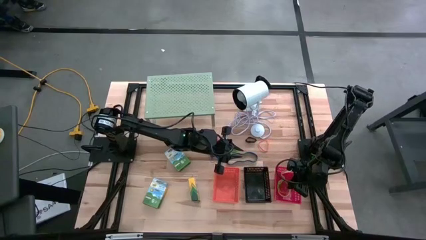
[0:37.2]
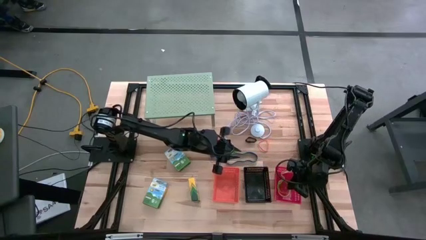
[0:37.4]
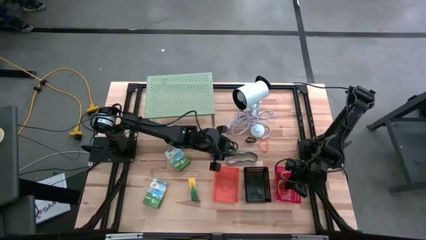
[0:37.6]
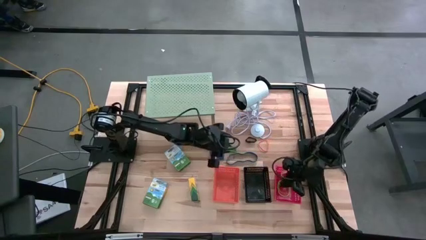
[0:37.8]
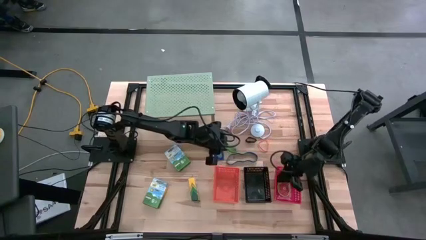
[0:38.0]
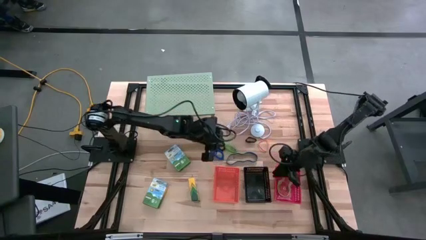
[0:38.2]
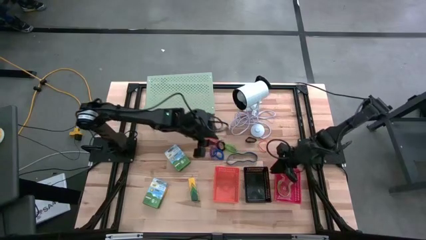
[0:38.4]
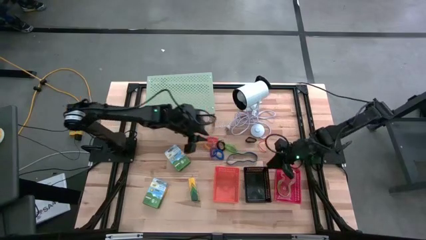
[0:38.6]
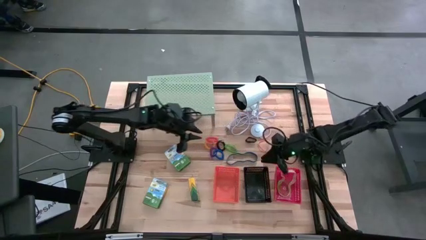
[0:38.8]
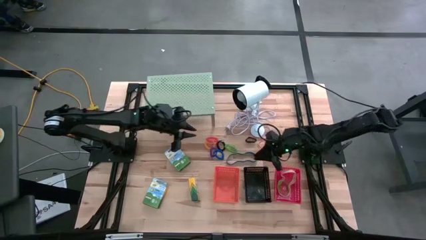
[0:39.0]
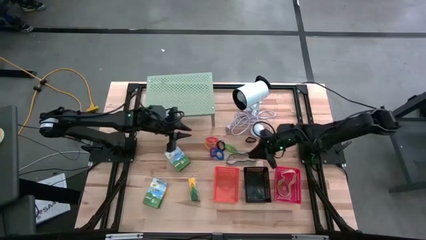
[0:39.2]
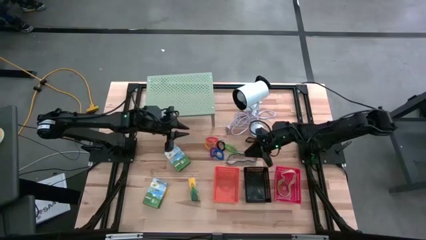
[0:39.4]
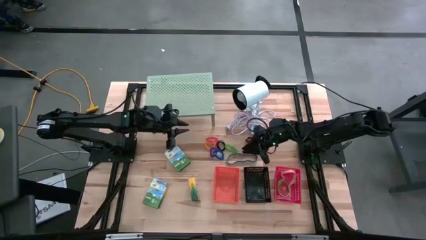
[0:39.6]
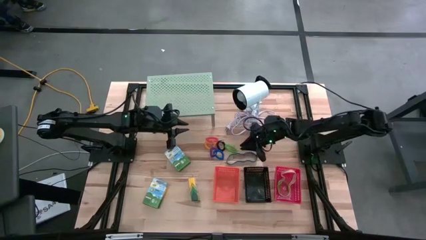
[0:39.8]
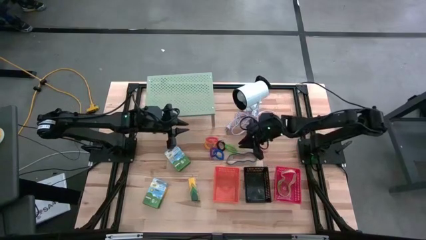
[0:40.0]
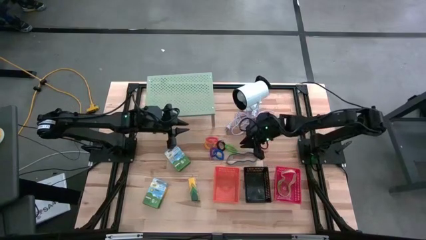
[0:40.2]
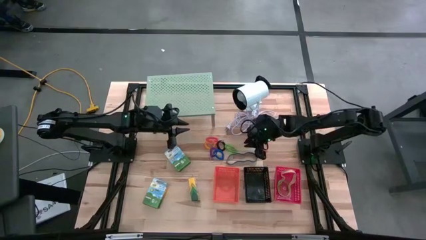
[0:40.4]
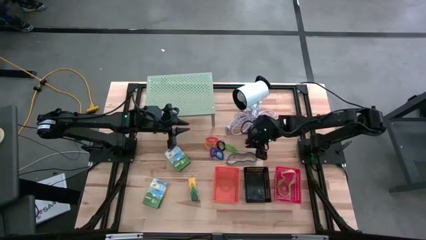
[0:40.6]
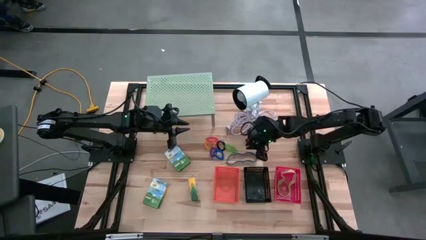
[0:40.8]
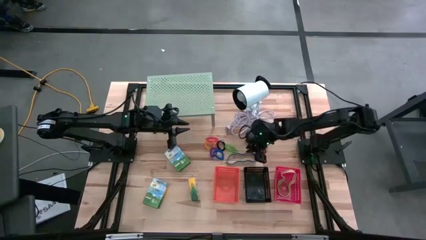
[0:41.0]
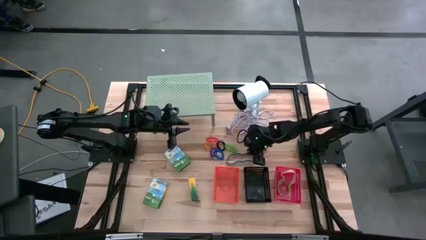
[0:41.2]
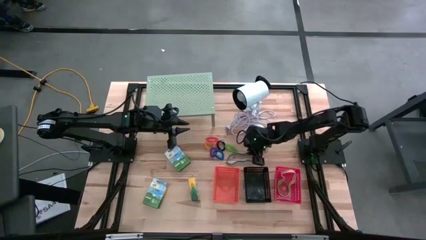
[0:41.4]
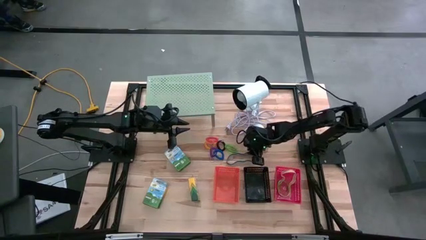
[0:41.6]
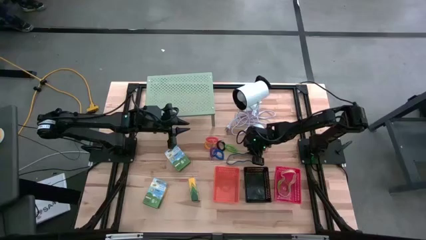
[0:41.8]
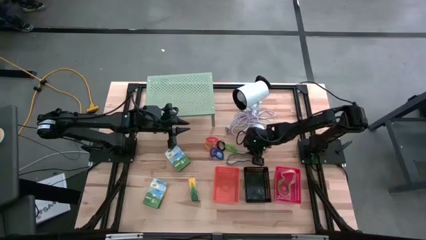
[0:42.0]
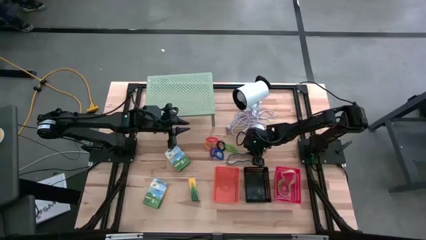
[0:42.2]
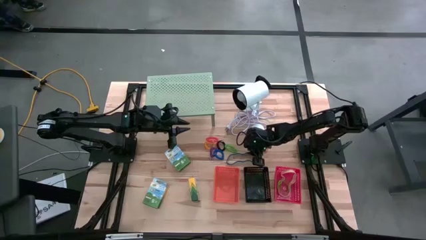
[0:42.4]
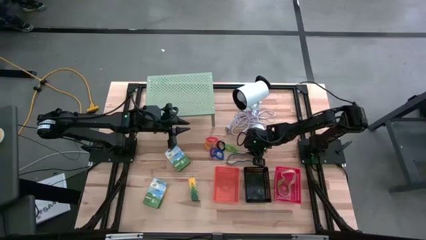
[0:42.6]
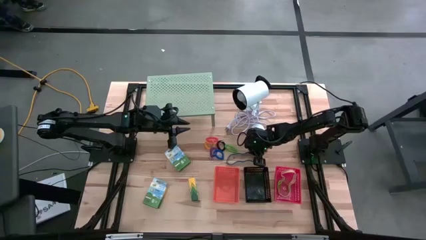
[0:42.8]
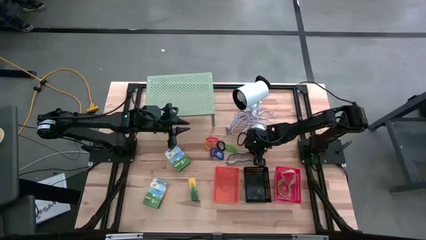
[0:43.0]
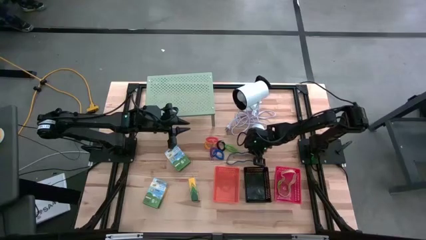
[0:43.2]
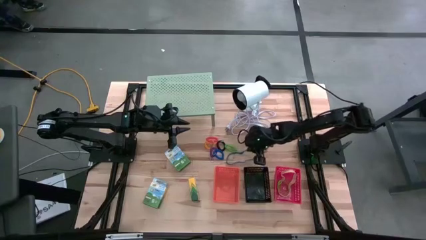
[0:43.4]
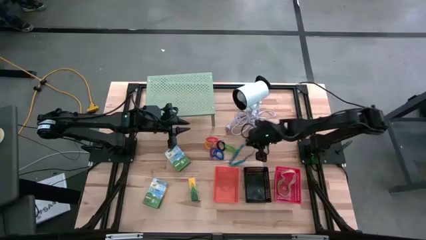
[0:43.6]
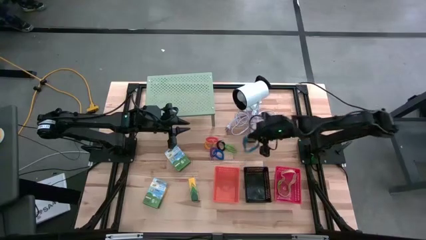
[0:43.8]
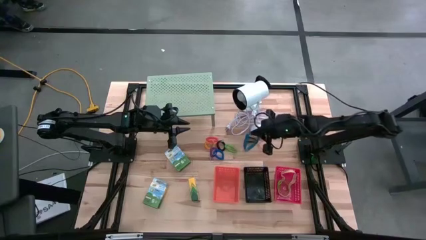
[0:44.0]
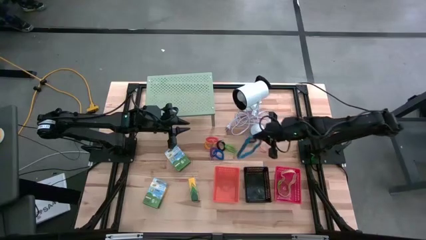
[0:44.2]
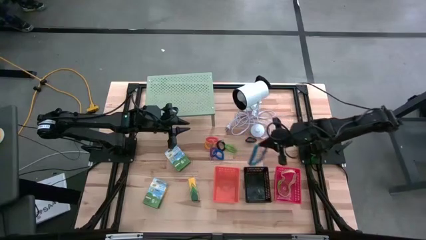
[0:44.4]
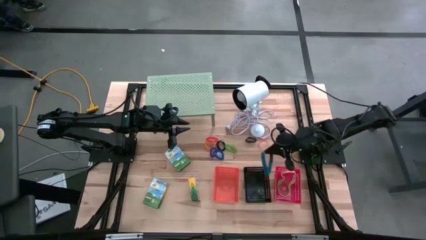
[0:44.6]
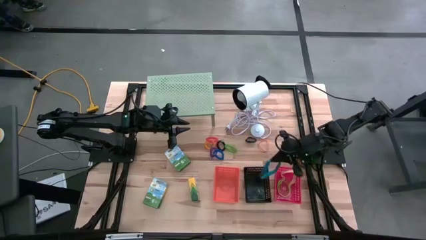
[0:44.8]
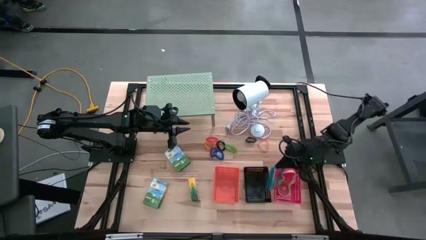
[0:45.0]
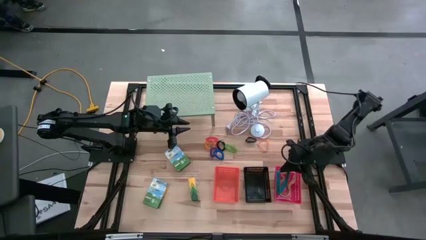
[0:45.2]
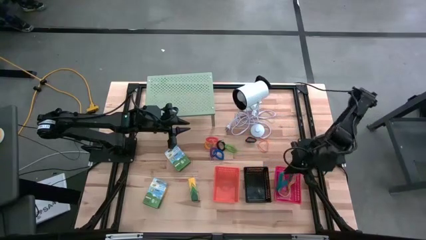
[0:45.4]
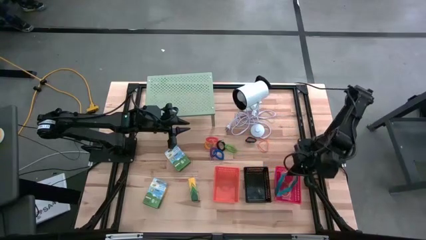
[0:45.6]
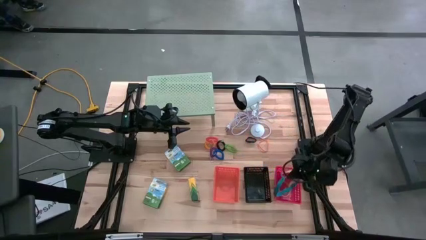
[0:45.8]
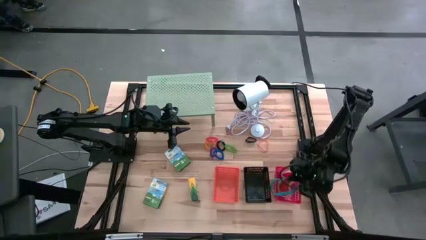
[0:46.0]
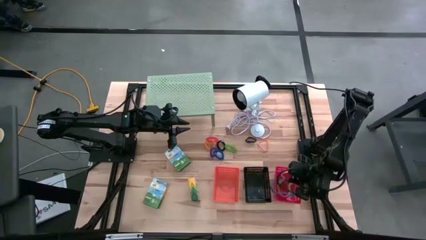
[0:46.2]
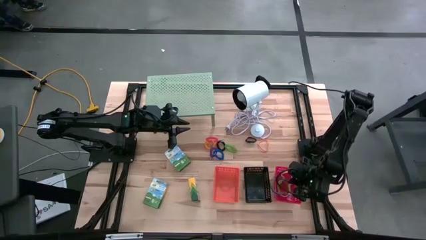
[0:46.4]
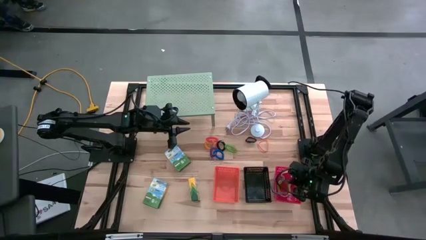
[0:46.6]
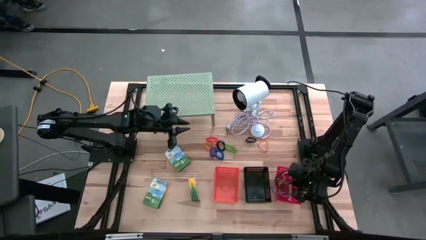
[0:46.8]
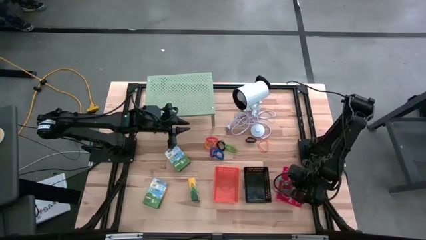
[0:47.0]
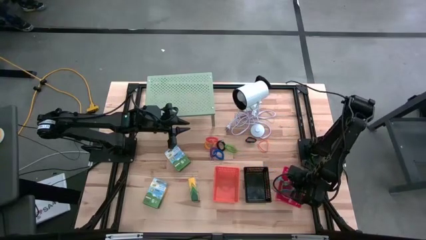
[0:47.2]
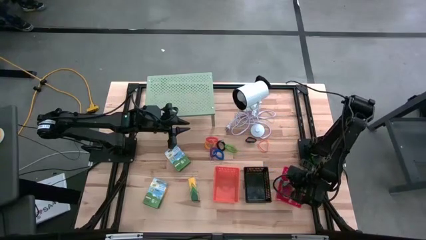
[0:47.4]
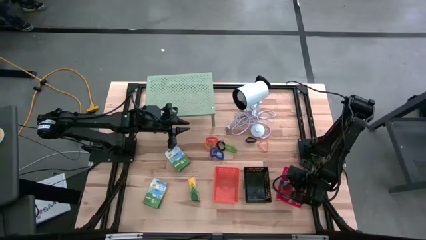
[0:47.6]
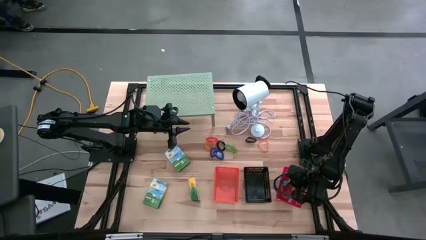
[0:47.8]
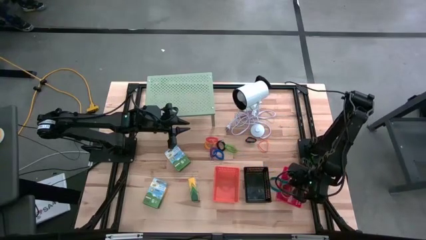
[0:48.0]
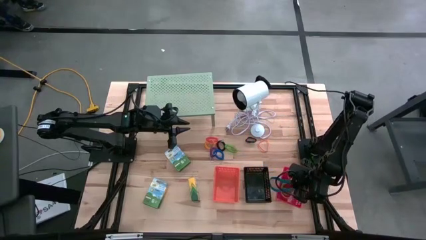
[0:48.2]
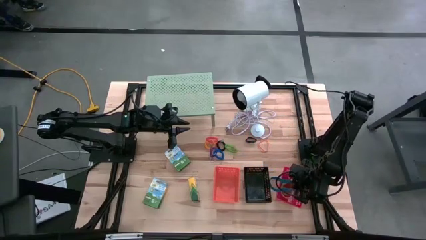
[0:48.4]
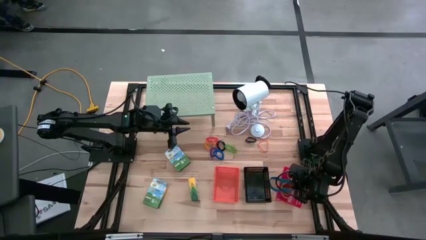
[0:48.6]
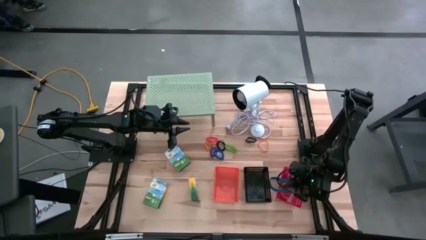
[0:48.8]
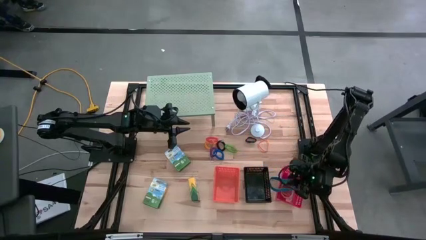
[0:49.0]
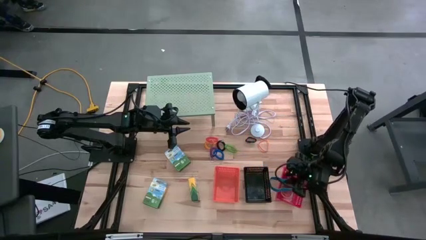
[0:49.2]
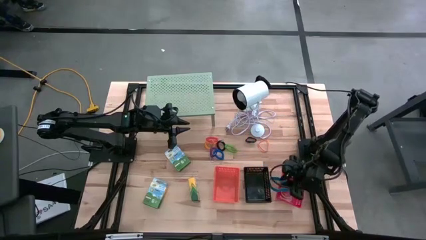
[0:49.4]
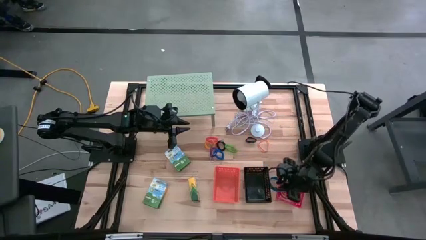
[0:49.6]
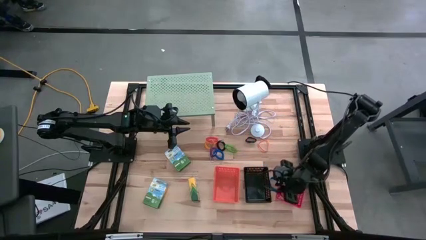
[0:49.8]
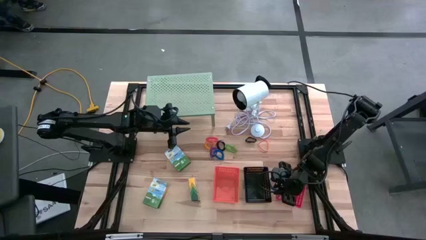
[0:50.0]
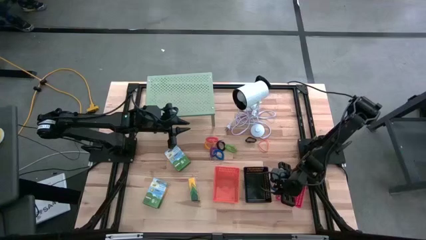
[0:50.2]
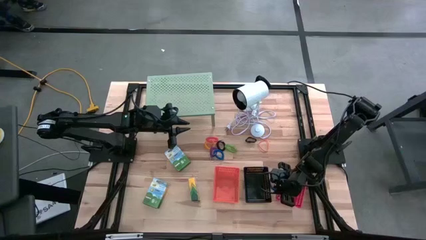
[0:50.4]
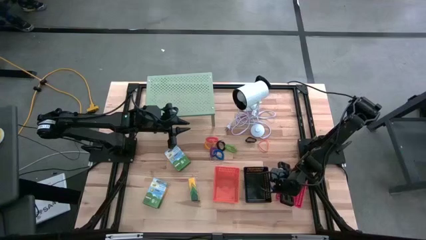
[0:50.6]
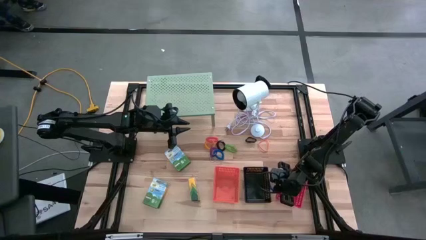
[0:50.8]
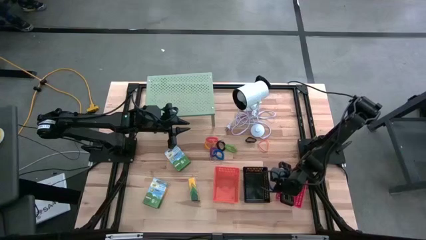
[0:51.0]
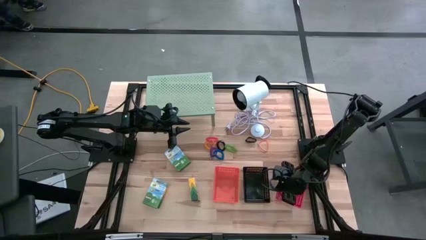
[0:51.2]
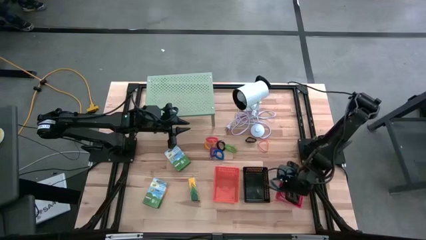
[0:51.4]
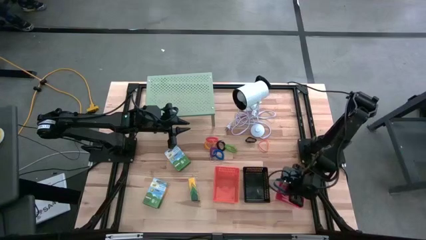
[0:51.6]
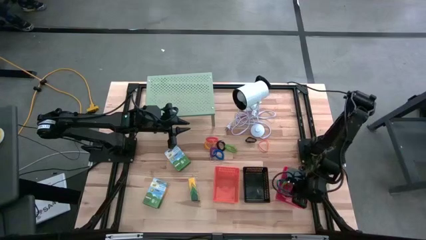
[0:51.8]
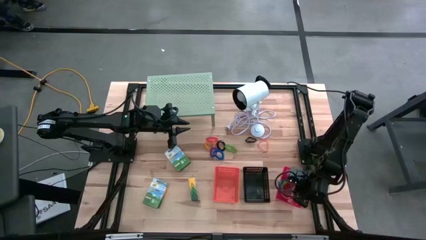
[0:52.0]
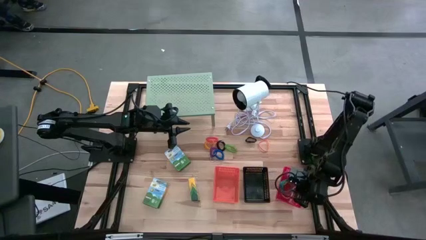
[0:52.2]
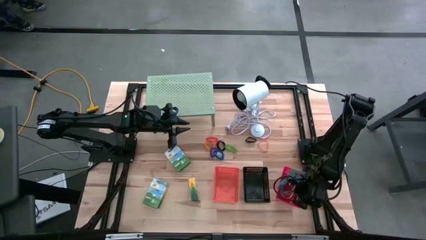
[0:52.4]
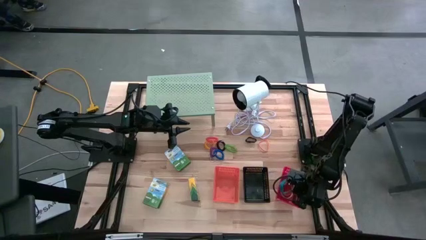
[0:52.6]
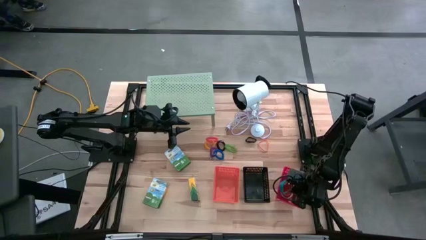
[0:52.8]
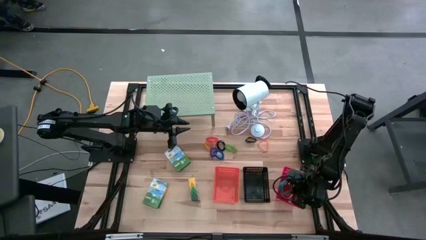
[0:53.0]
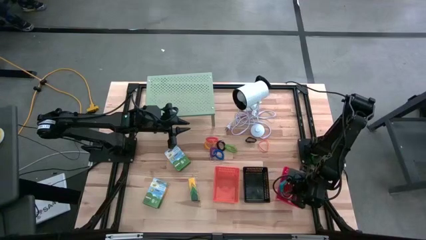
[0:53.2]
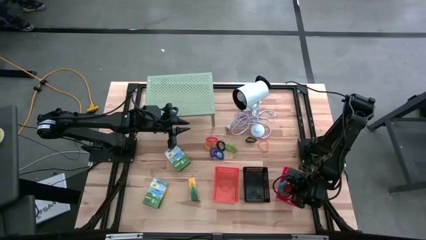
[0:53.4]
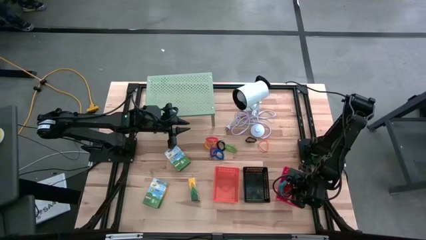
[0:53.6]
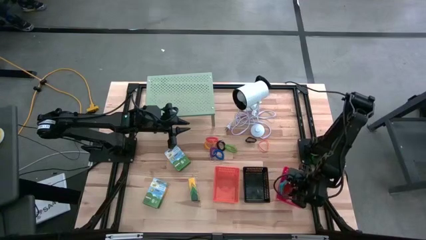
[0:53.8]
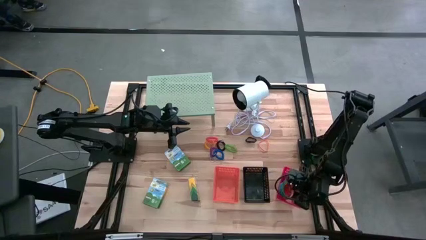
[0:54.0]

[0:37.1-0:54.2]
Task: Pick & Place Office Desk Supplies
Put the blue rubber band into the red basket
